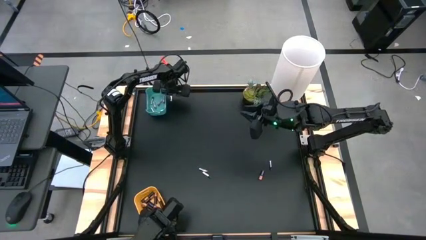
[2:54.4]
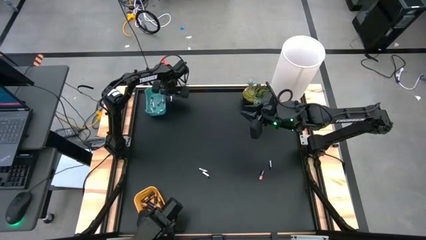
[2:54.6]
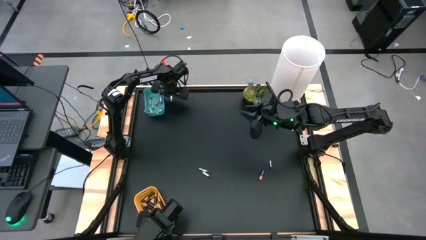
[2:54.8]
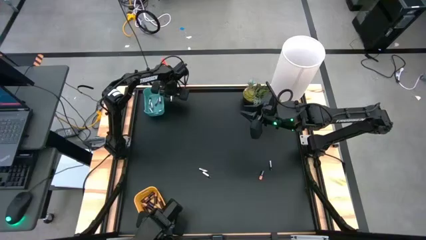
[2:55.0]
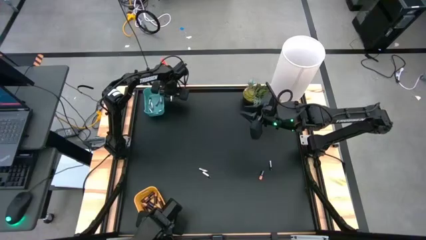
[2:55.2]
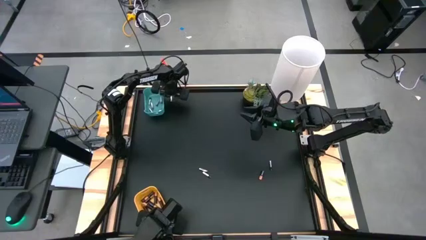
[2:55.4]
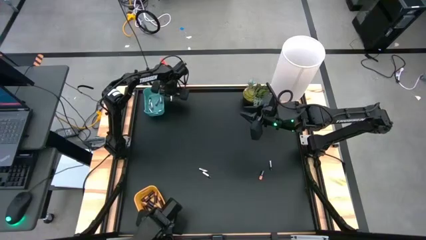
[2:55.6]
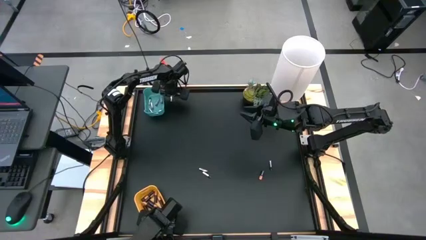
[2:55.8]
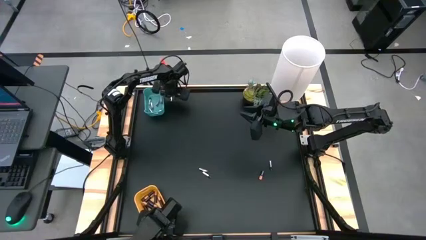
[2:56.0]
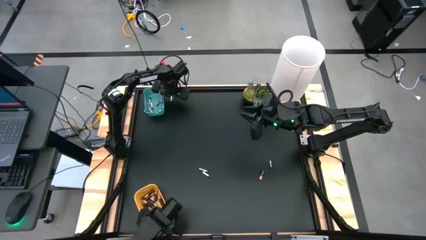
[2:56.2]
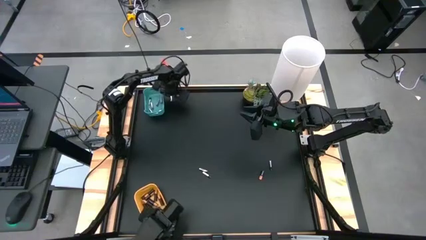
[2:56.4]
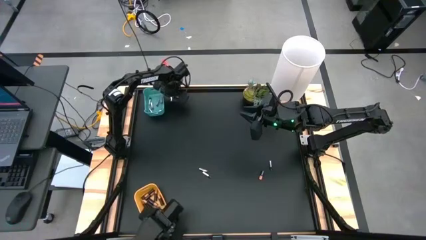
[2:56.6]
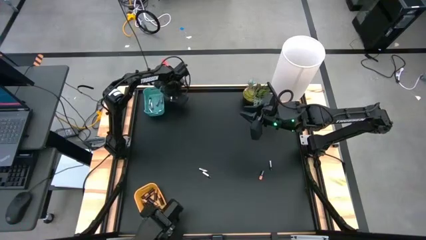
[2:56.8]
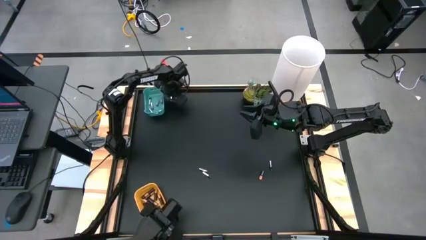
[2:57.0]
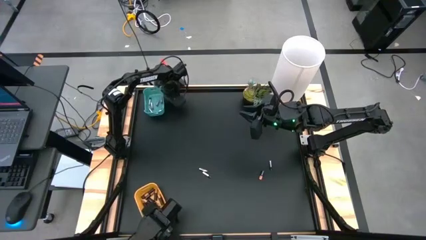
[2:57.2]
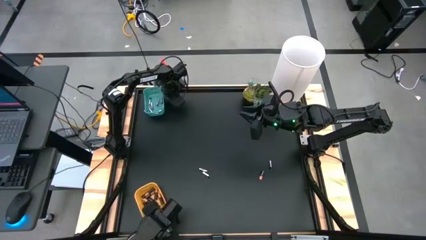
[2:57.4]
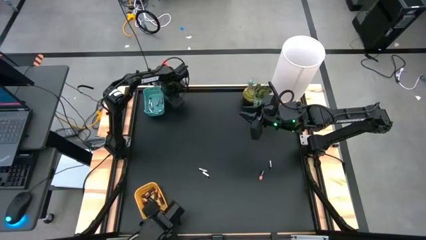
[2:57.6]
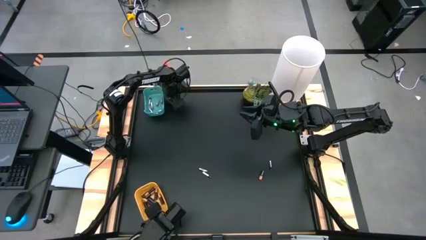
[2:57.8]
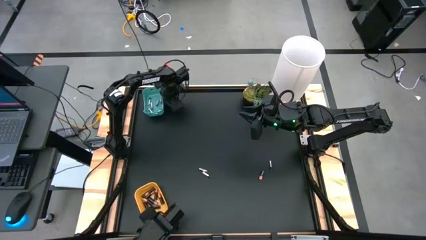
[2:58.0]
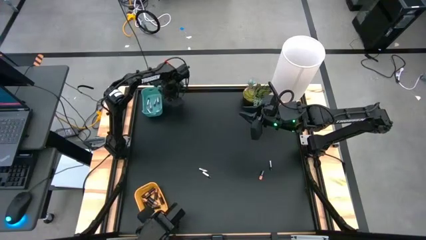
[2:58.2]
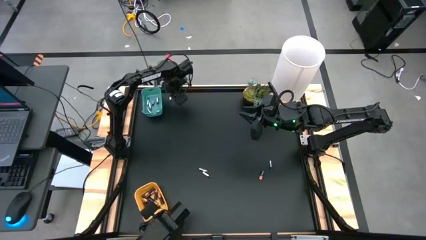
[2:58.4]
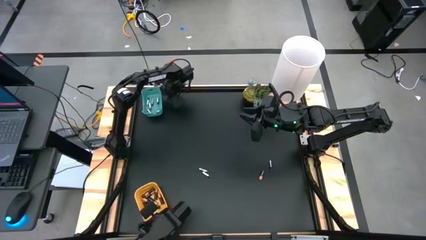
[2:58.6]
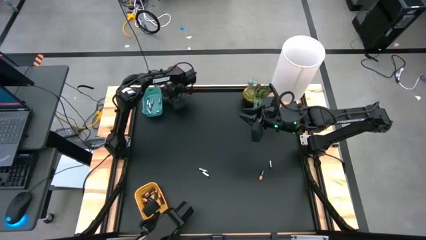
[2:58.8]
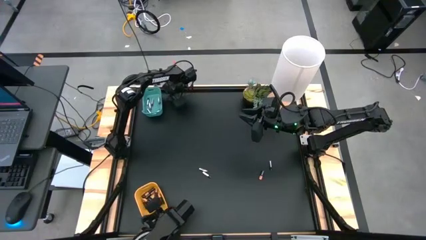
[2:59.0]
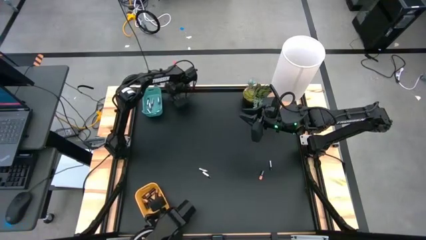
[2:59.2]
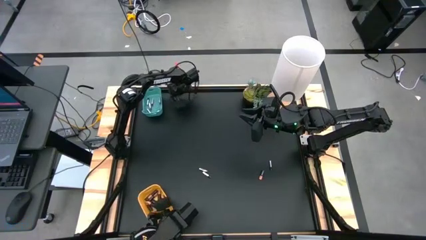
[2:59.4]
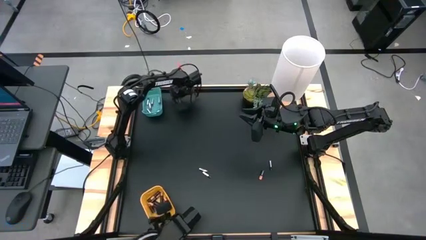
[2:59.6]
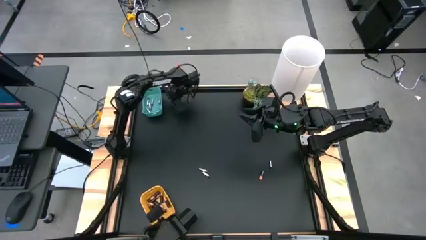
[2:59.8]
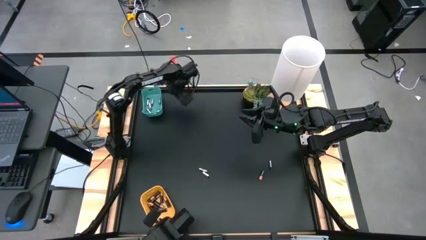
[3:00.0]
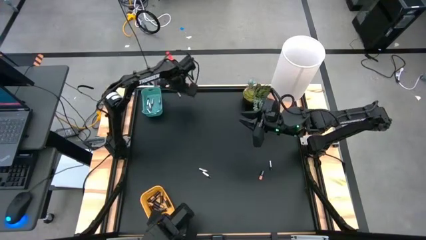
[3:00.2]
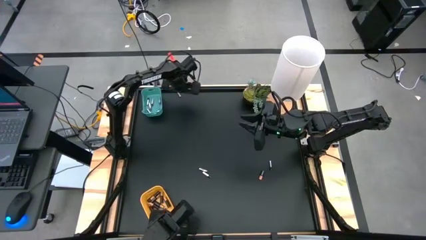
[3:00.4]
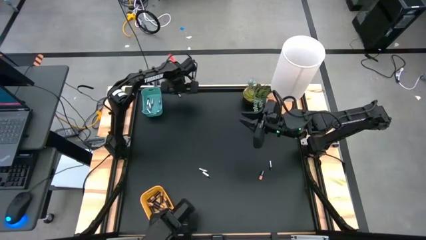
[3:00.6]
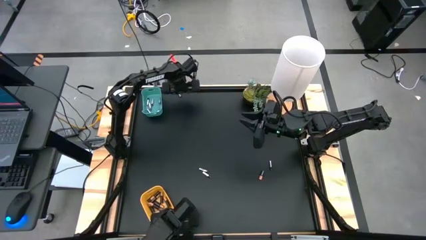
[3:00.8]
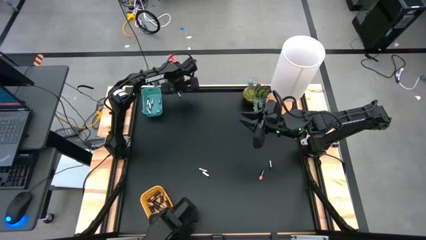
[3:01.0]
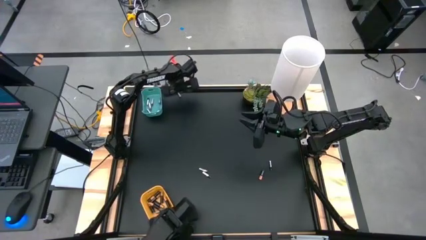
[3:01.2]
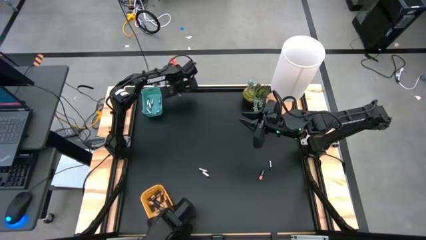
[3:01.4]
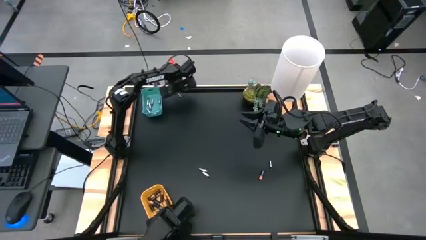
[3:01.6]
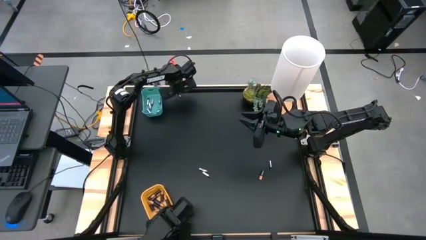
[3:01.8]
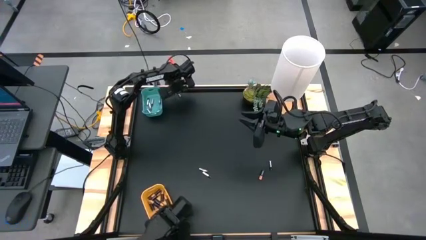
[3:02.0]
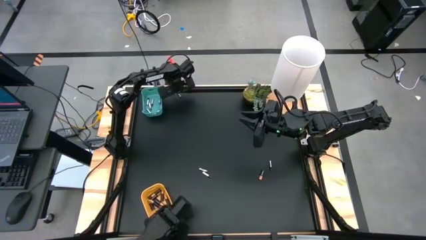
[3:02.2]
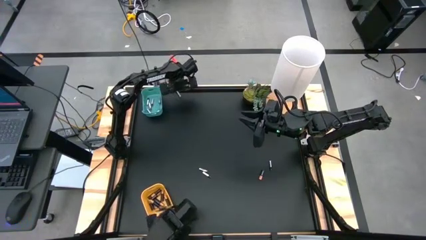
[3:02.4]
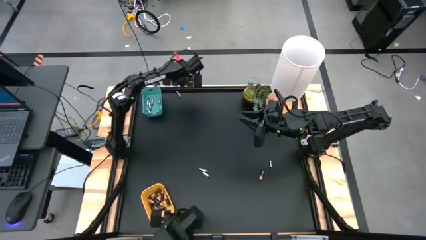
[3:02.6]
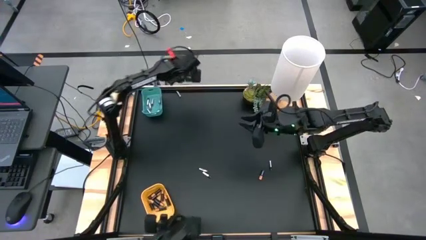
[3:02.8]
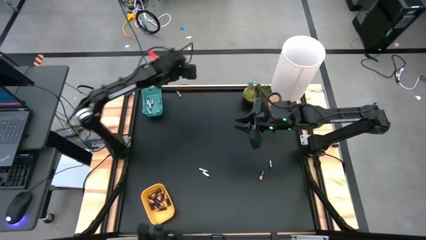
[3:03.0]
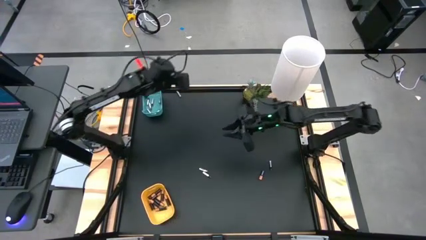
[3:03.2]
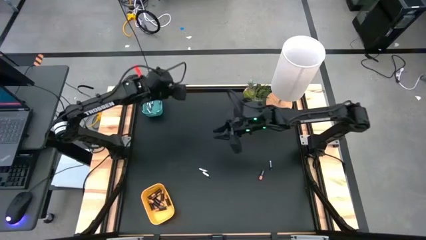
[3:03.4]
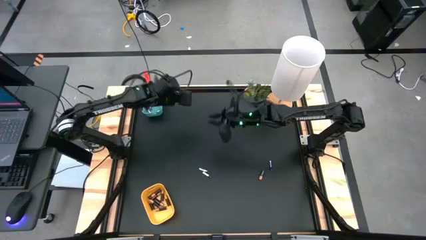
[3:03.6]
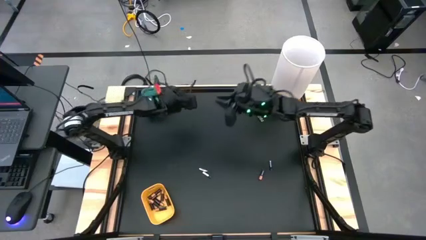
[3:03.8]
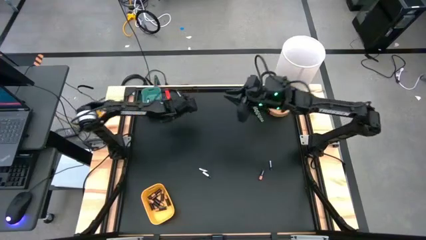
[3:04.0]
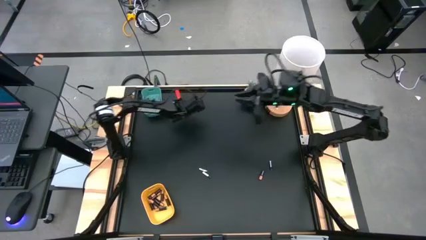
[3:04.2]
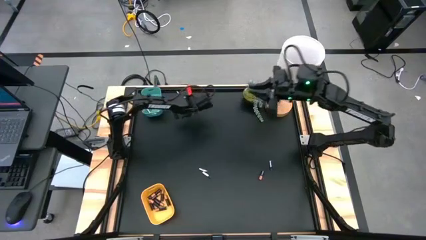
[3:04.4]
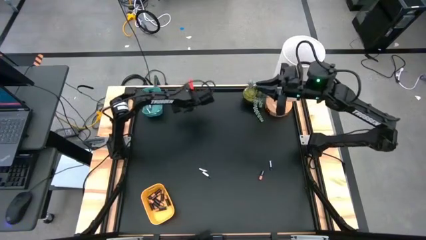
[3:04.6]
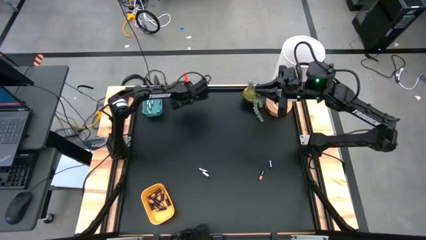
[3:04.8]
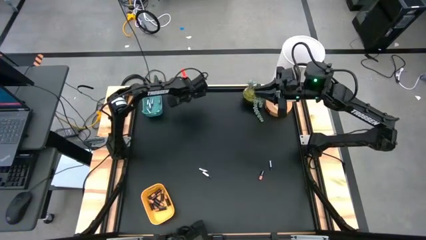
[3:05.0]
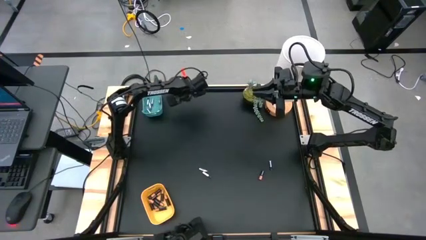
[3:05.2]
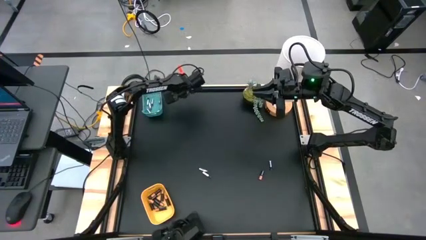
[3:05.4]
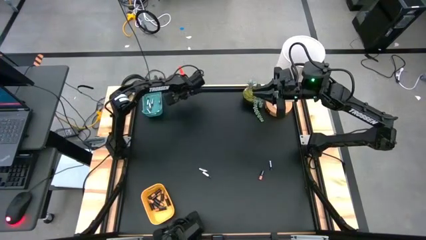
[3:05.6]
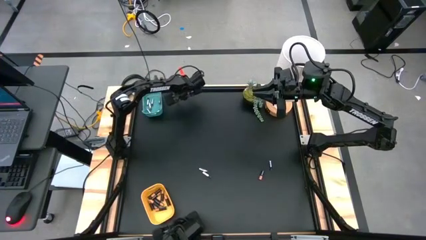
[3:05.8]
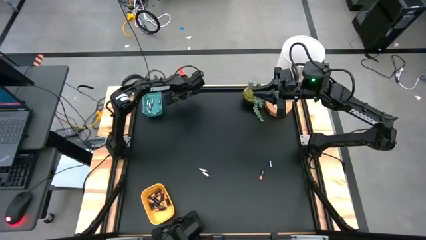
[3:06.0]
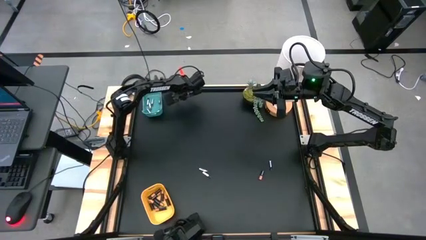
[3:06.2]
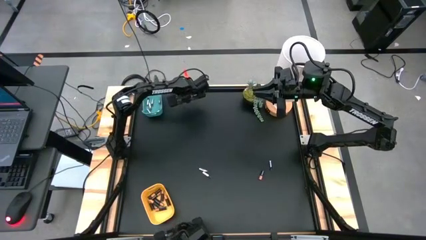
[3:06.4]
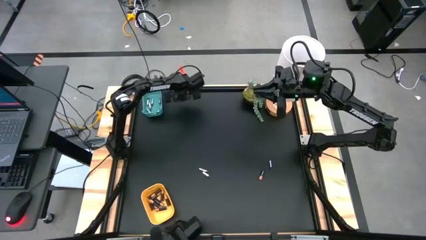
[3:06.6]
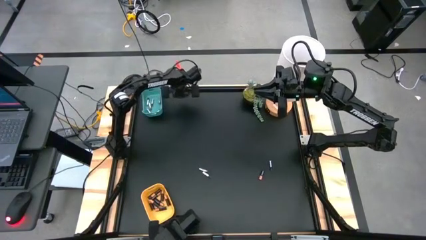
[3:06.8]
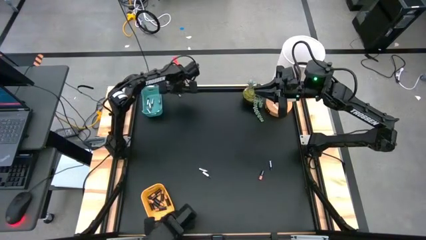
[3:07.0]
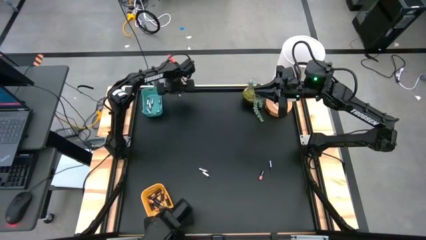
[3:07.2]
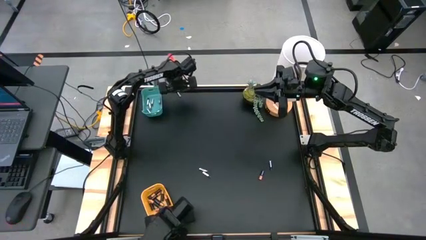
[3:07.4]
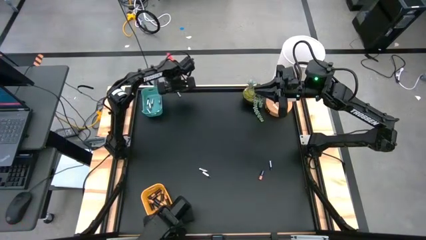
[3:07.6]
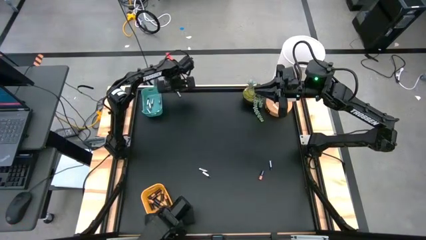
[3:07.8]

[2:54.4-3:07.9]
Task: Sort batteries
Put the silver battery into the blue bin

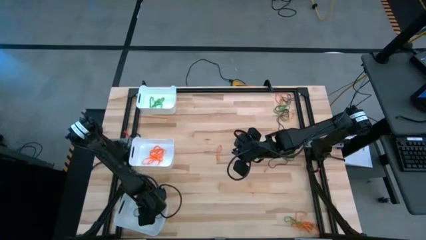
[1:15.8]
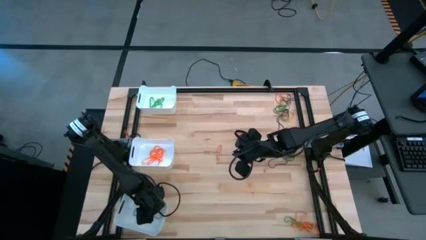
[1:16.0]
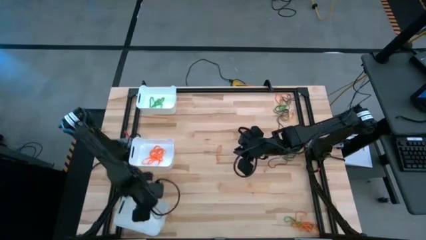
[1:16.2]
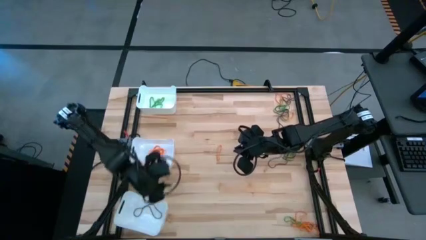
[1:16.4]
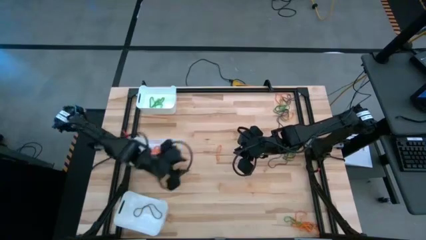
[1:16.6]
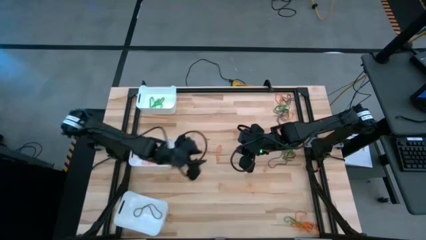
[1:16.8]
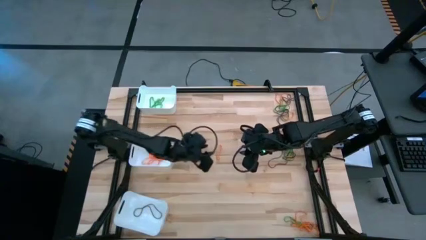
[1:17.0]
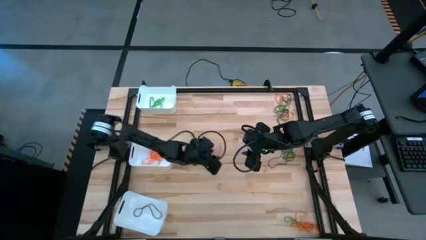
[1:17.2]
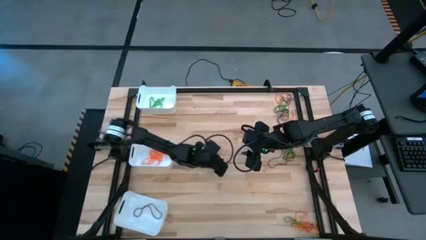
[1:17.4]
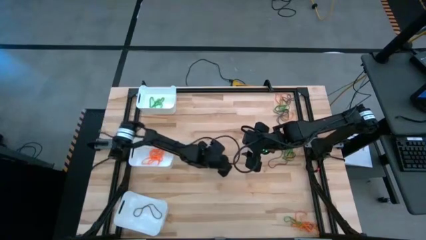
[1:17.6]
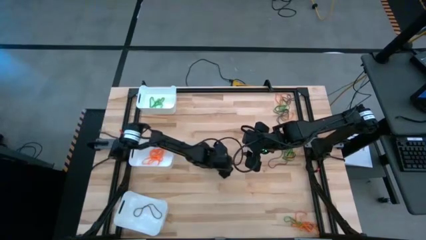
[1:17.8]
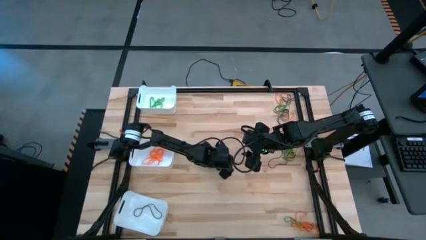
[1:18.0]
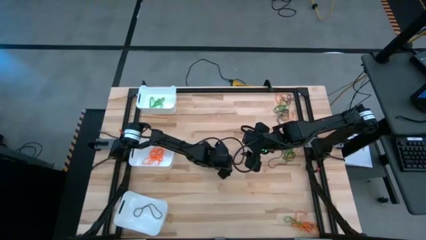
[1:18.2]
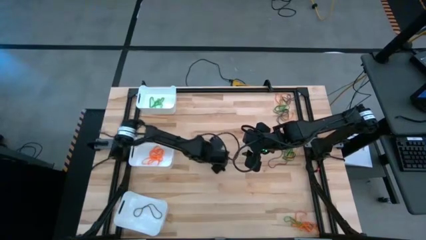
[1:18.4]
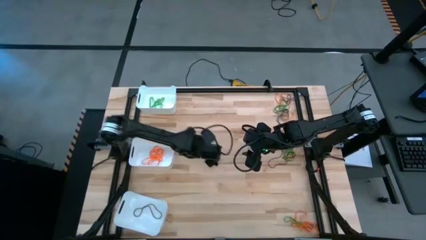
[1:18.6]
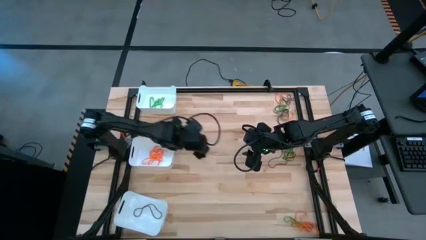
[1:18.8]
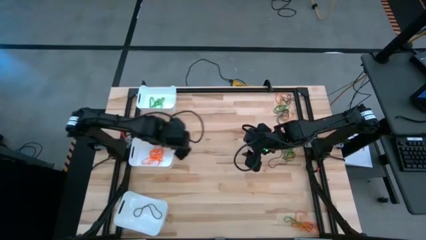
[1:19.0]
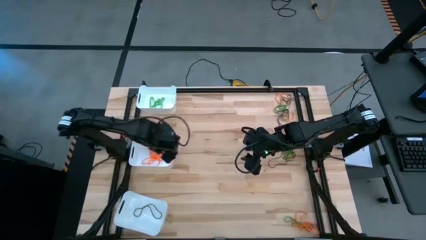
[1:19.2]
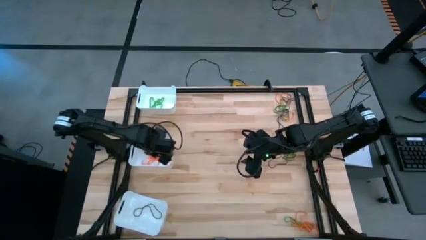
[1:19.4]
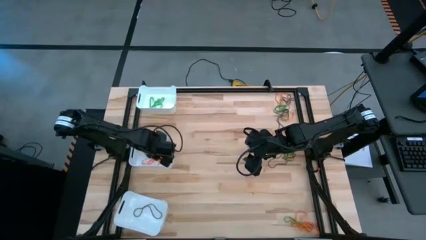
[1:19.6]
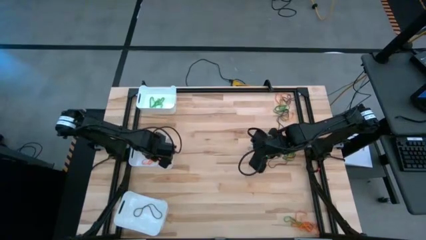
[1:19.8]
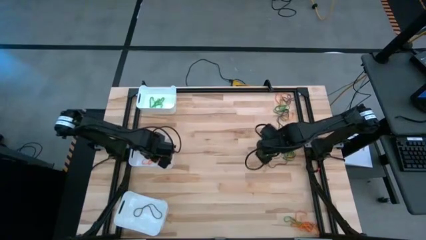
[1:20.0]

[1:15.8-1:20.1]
Task: Sort rubber bands into baskets
Put the orange rubber band into the middle white bin
